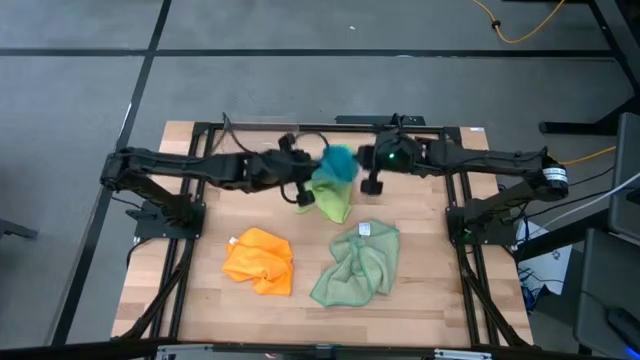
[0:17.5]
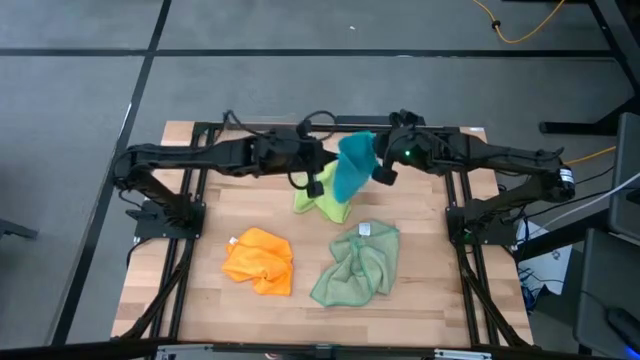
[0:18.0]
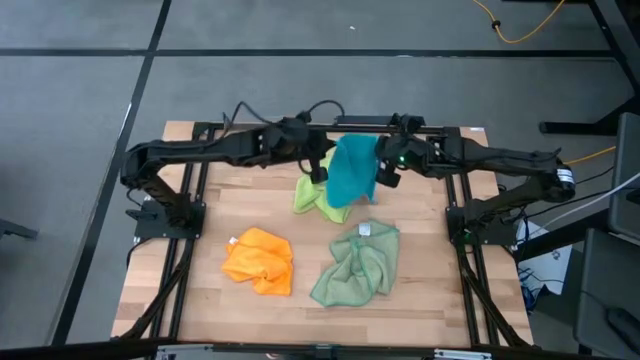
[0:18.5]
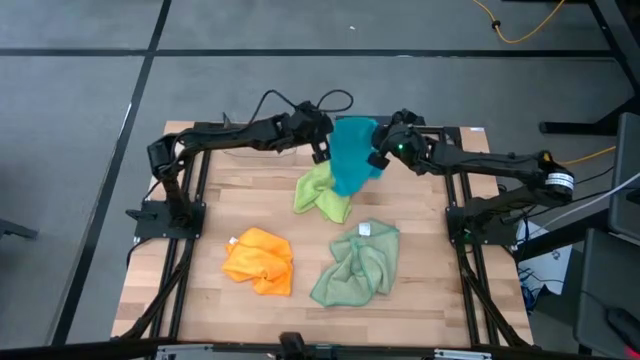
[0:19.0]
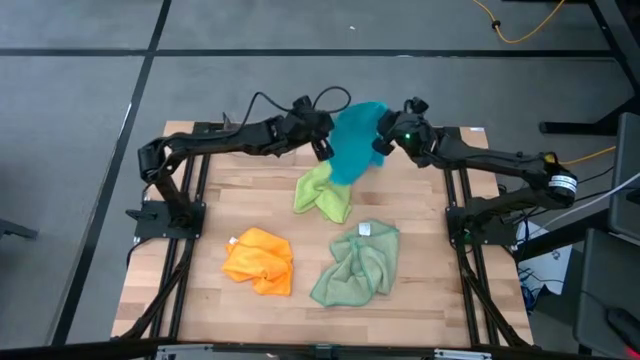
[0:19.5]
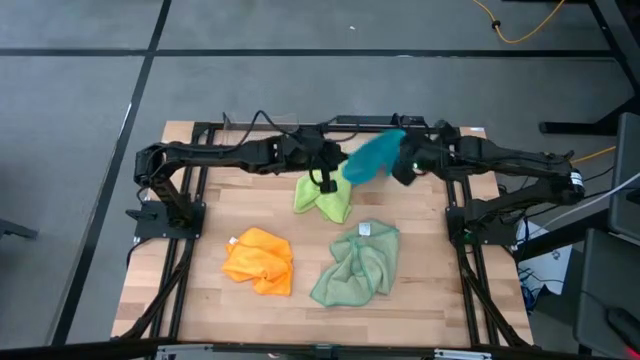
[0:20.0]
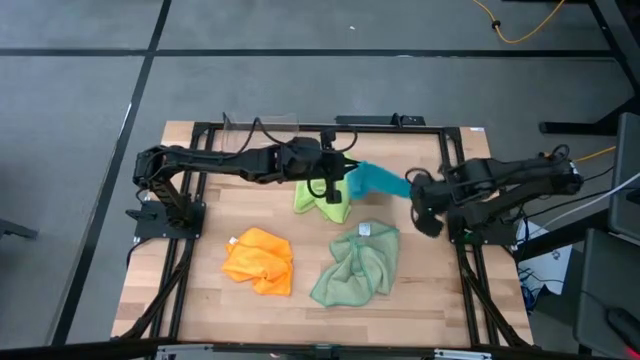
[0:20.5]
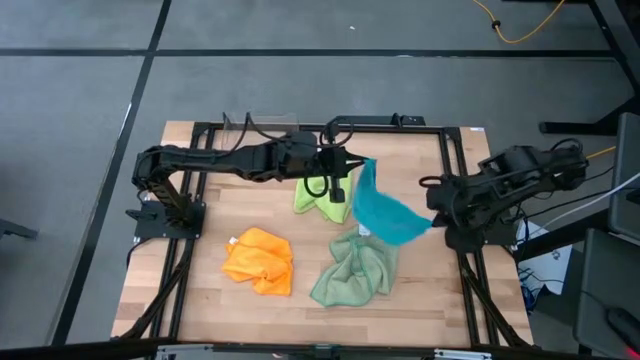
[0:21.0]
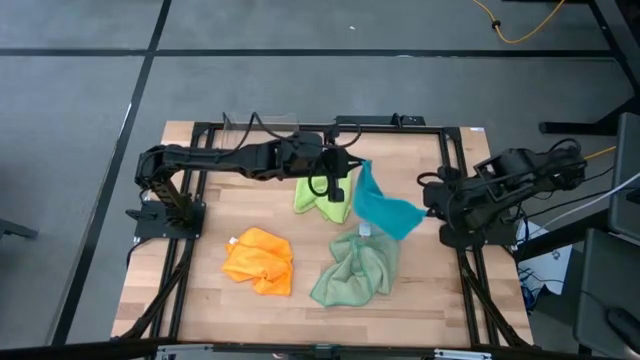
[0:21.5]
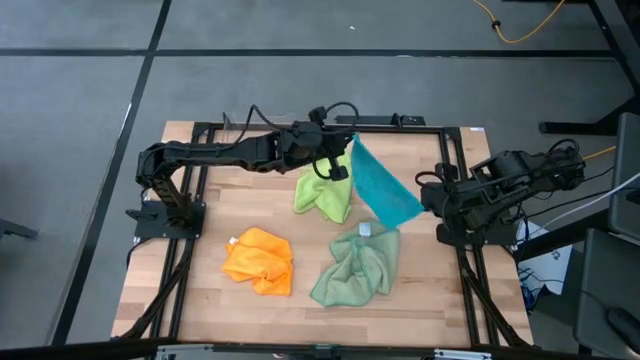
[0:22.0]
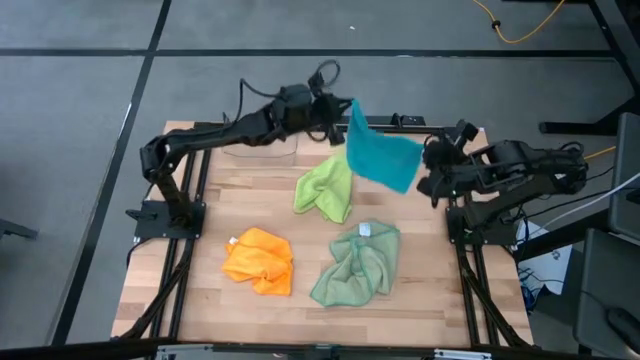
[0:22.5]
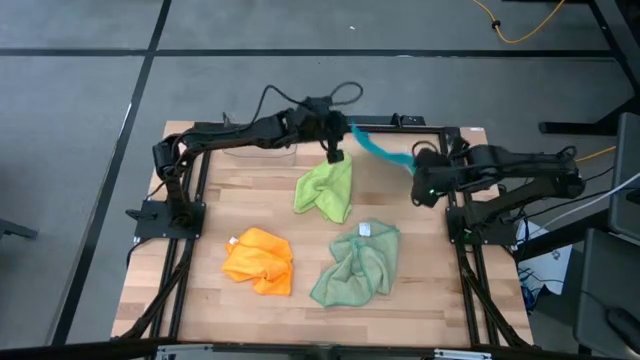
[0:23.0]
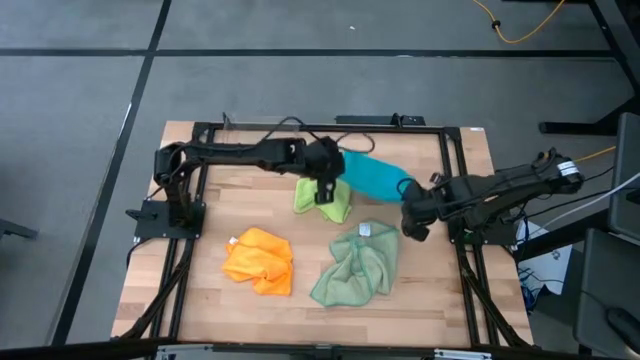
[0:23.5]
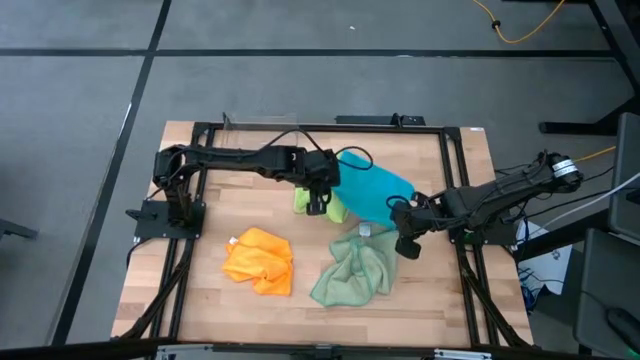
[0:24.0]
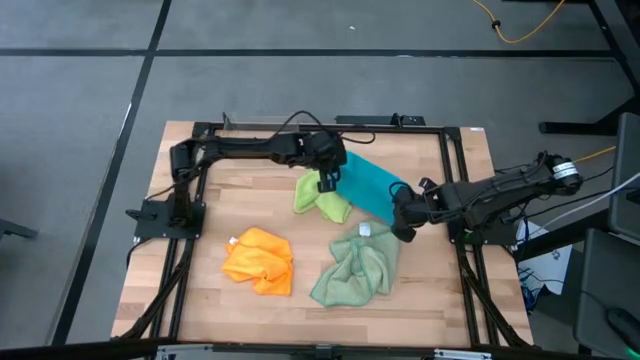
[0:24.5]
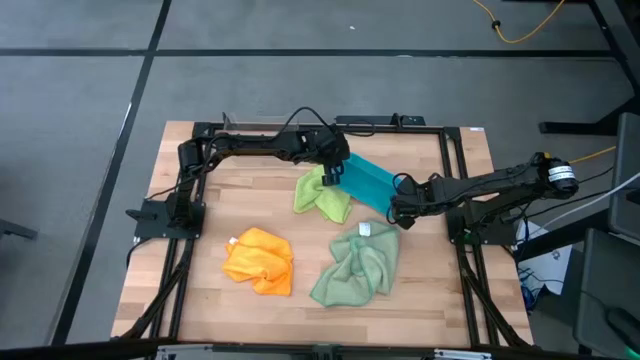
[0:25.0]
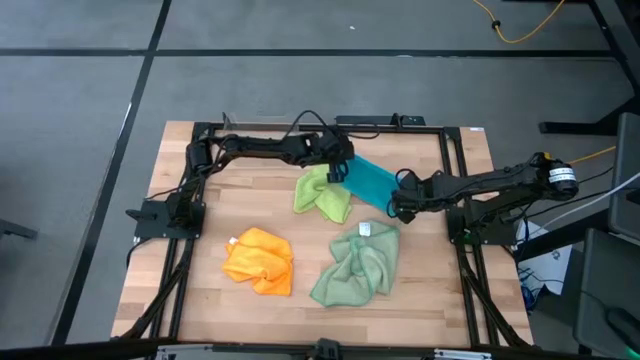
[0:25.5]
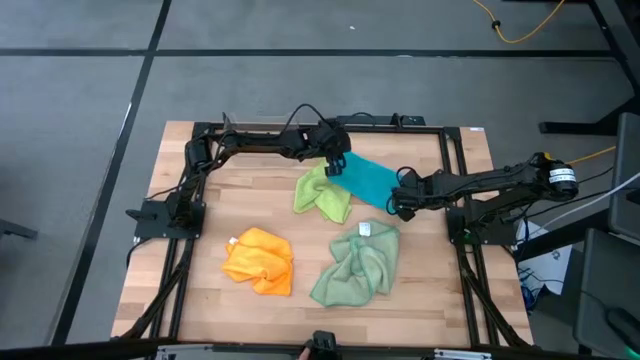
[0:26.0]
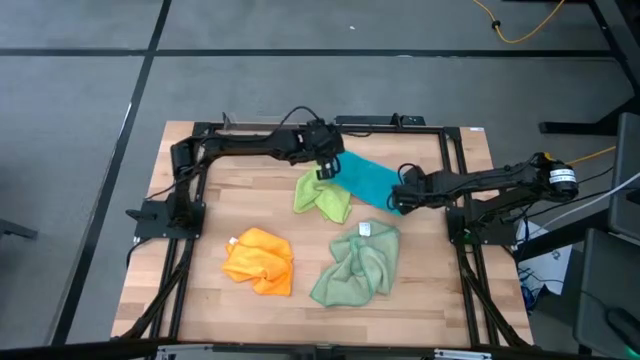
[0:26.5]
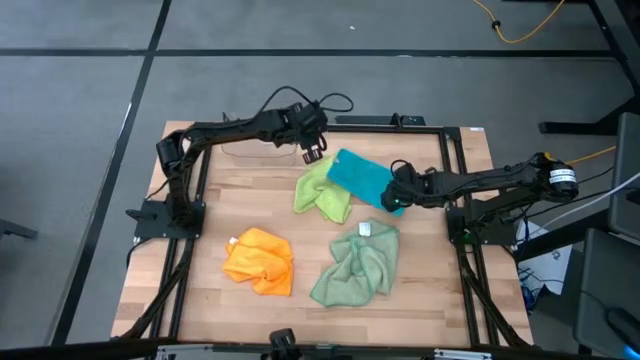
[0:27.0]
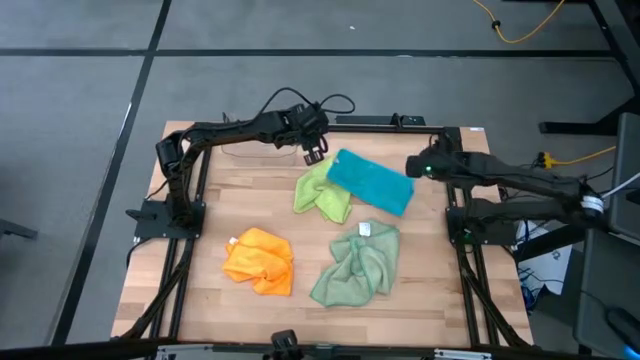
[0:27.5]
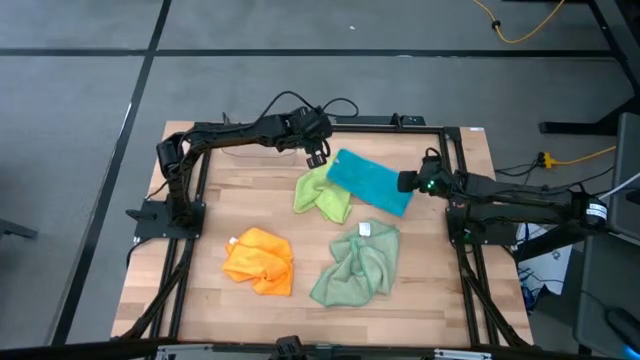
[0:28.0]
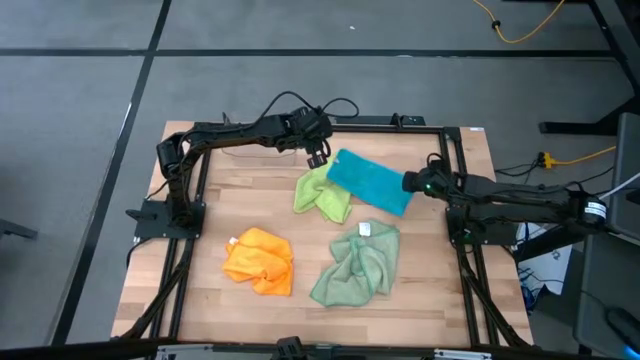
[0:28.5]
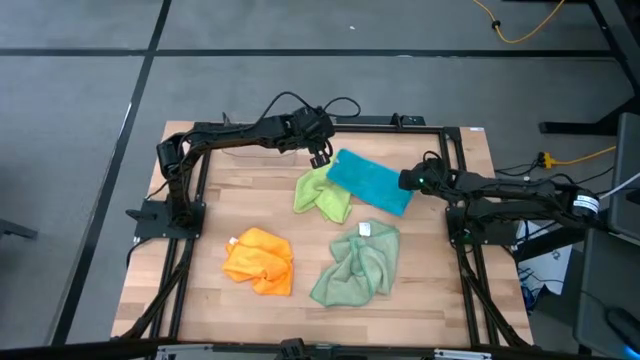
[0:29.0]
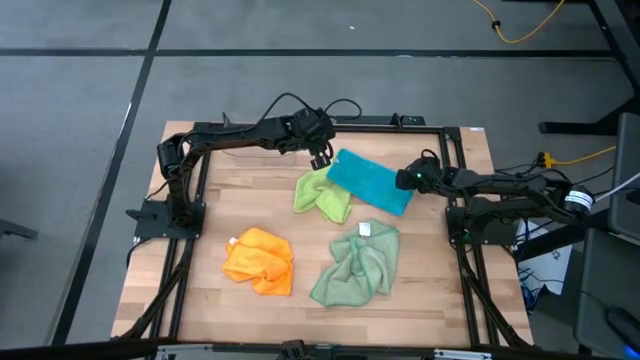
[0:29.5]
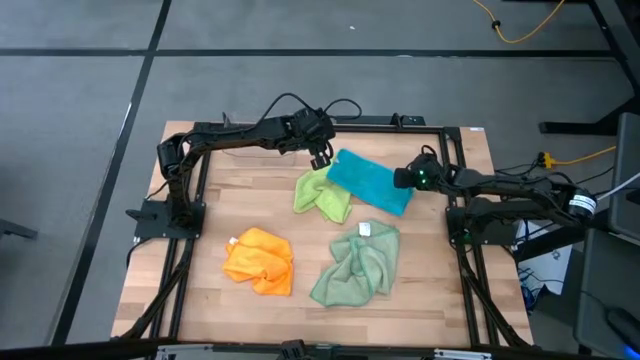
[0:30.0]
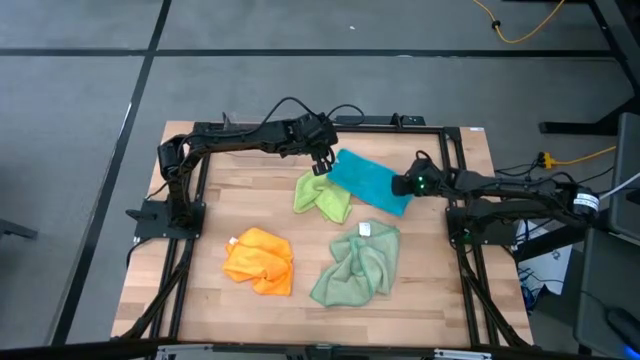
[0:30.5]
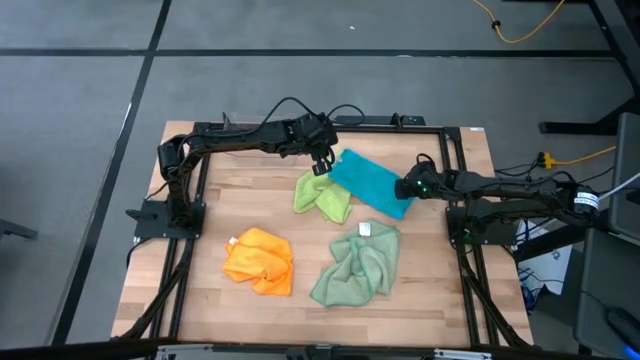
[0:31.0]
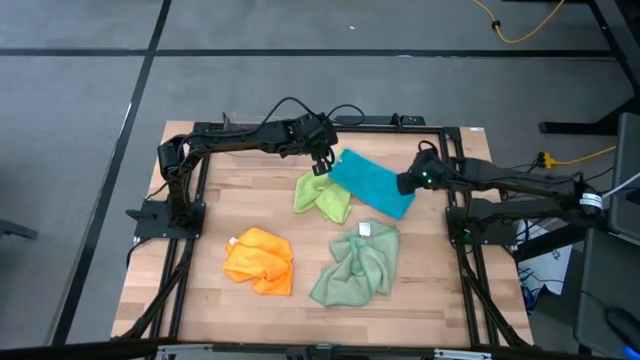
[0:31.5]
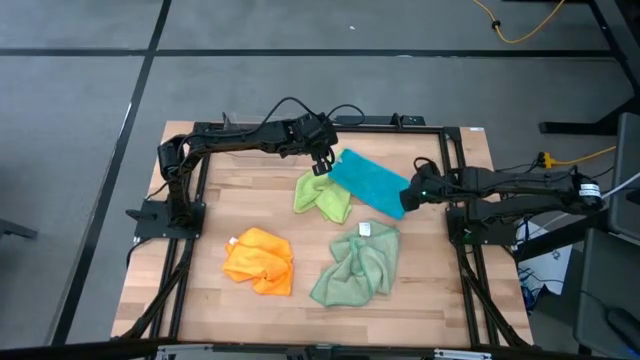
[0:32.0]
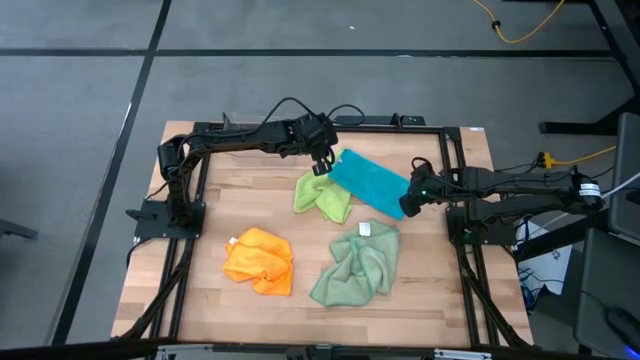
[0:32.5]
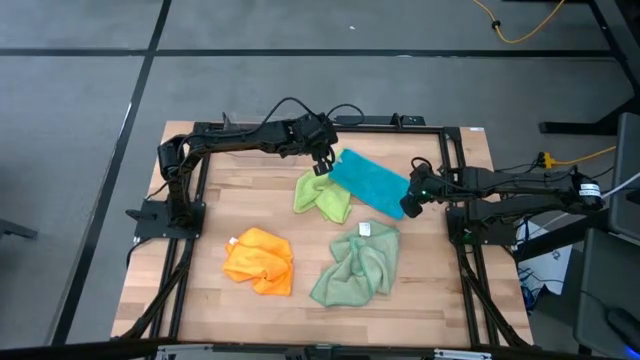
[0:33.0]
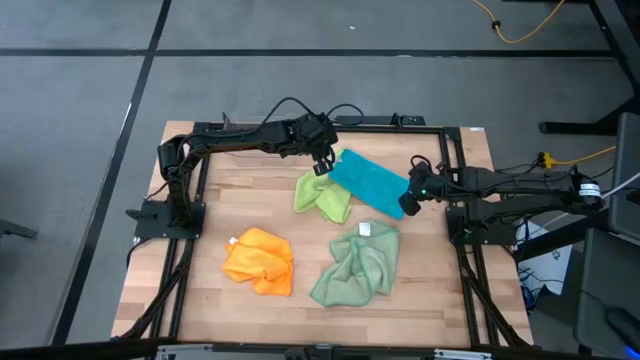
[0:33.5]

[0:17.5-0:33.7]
Task: Fold microfiber towels
Fold the blue towel

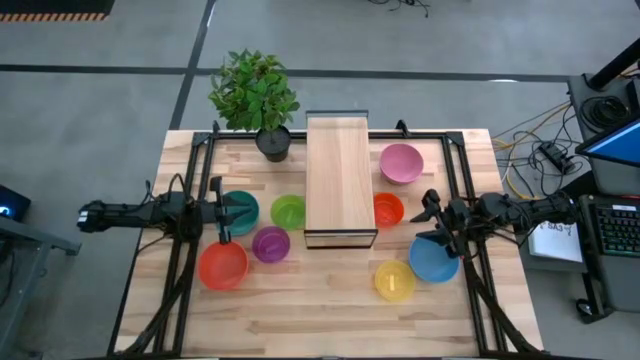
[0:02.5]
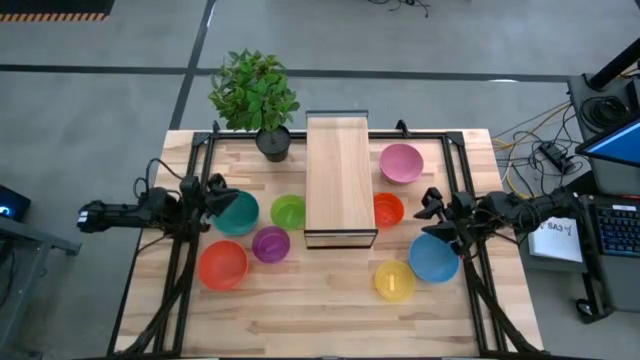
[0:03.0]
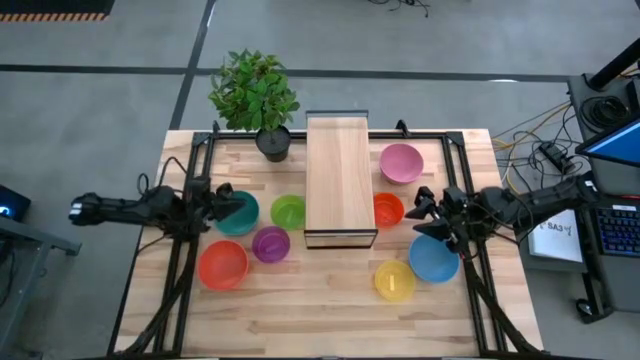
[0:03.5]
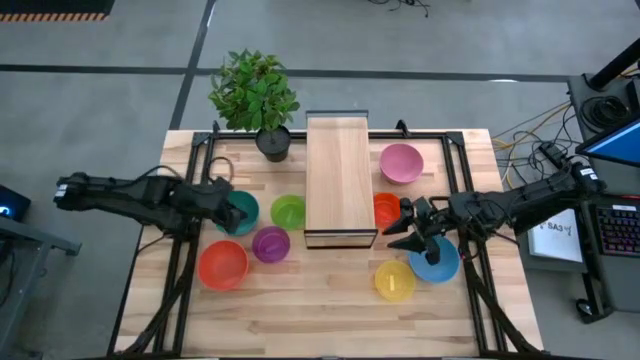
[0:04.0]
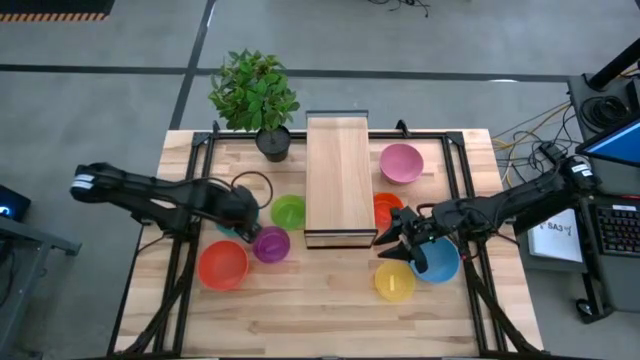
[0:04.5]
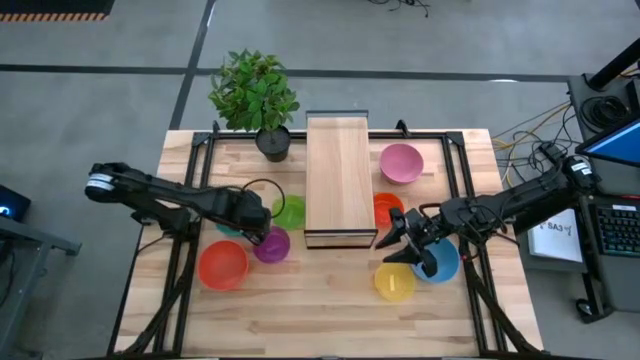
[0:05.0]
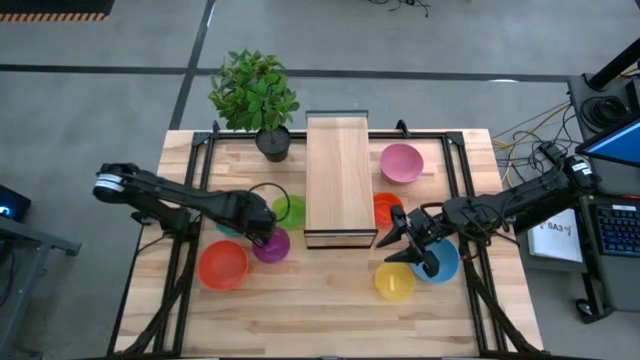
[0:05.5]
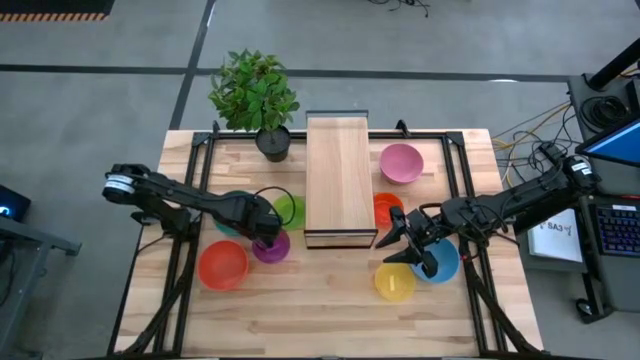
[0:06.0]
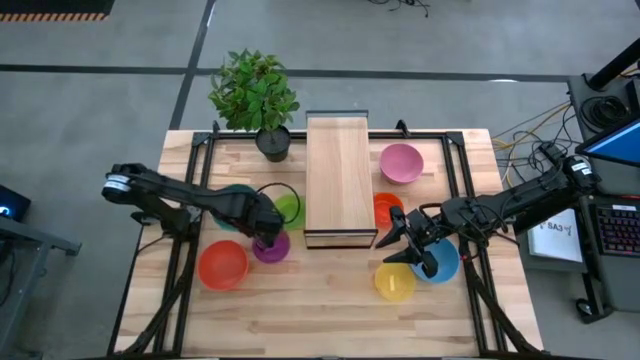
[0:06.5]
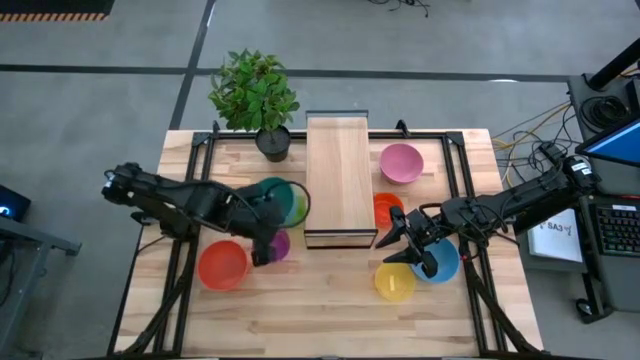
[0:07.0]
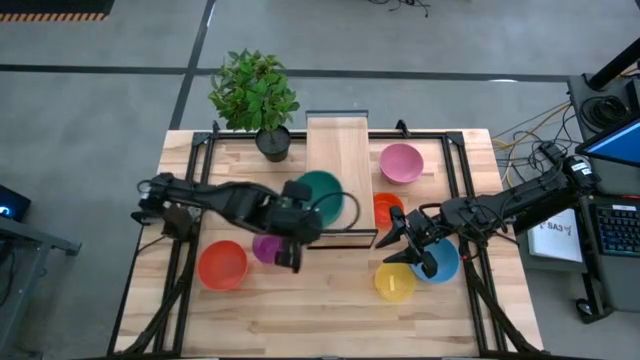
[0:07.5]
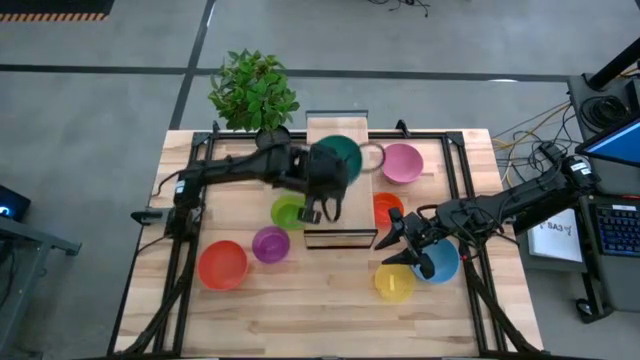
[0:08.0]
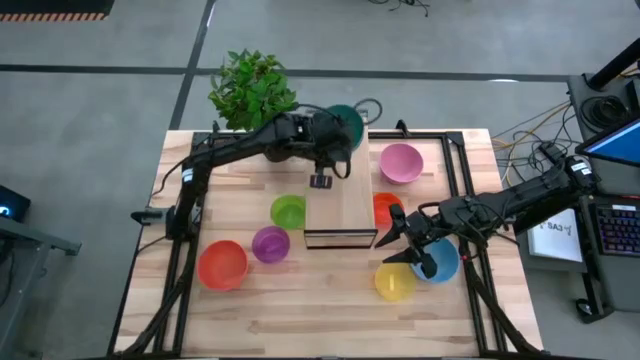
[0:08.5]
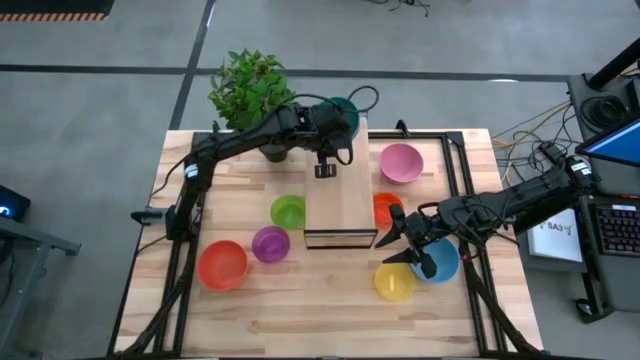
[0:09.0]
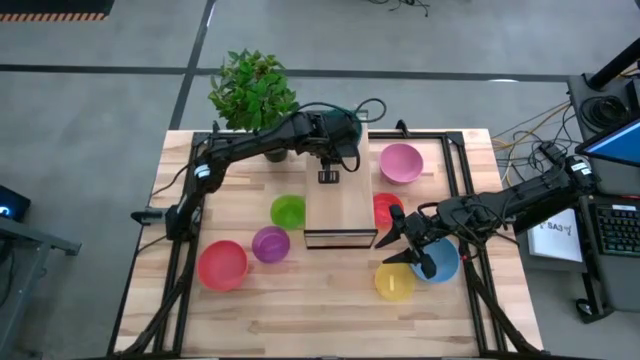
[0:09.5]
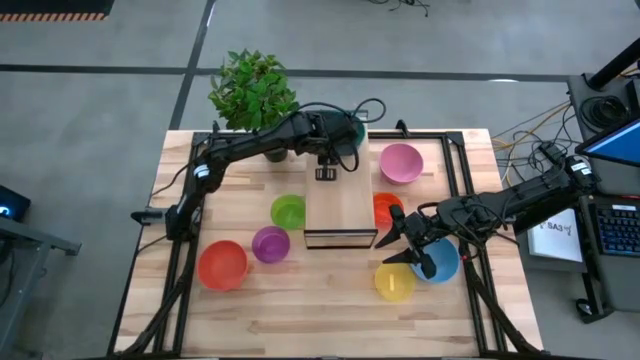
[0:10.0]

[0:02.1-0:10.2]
Task: Place and stack bowls onto a shelf
Put the blue green bowl onto the shelf
